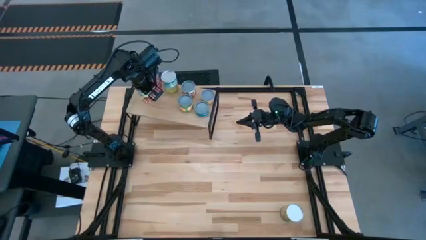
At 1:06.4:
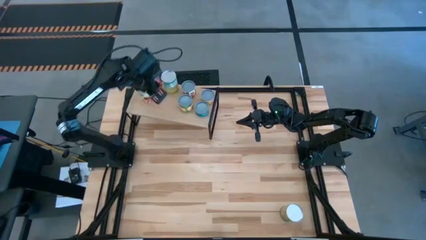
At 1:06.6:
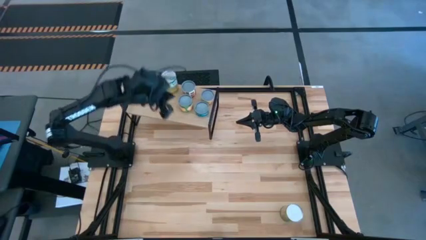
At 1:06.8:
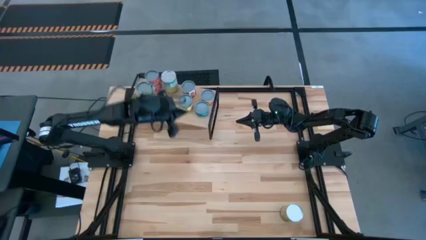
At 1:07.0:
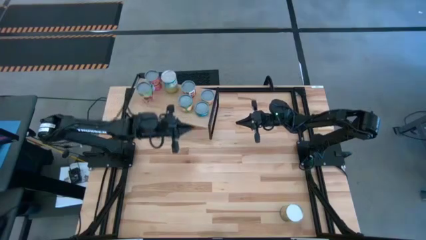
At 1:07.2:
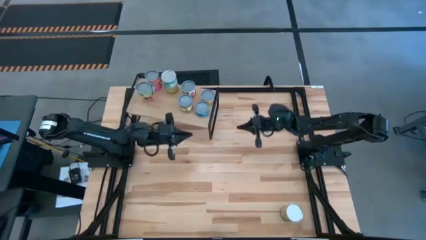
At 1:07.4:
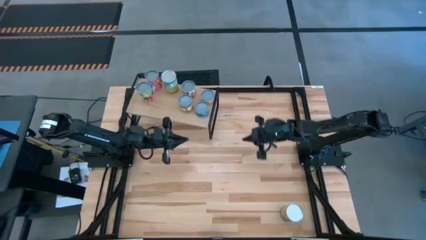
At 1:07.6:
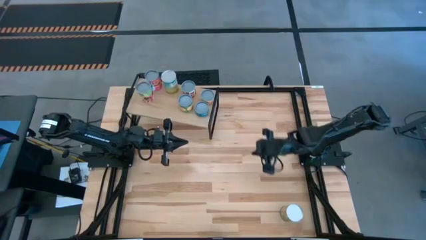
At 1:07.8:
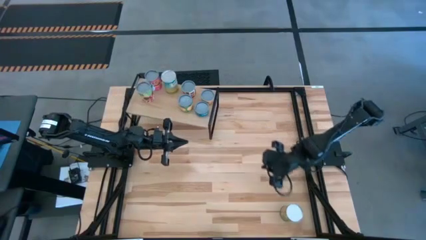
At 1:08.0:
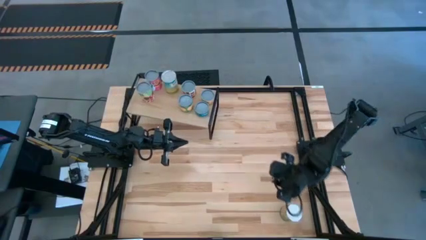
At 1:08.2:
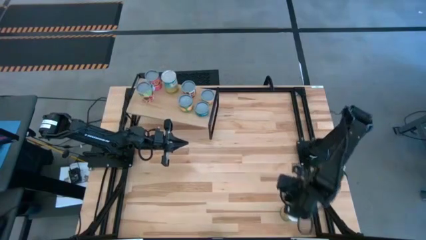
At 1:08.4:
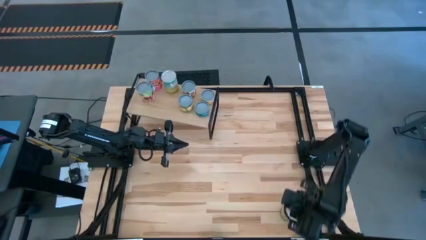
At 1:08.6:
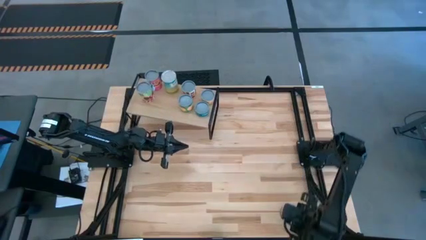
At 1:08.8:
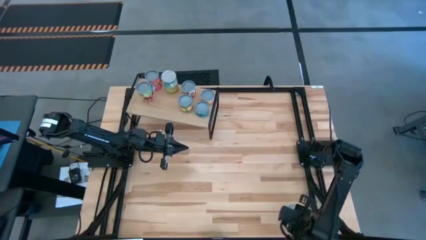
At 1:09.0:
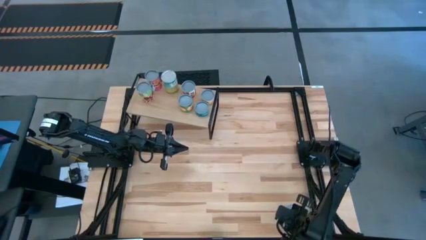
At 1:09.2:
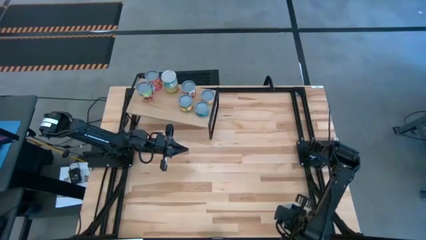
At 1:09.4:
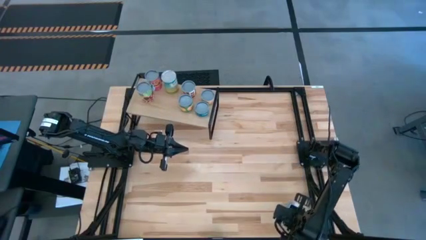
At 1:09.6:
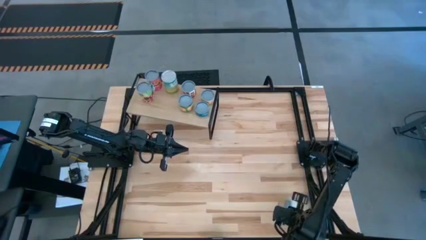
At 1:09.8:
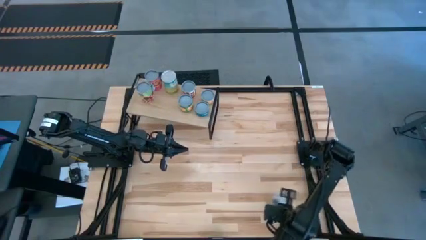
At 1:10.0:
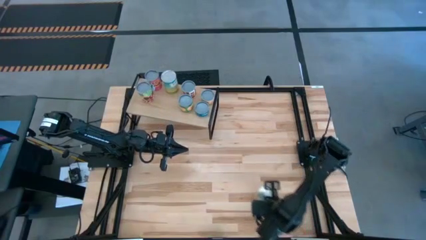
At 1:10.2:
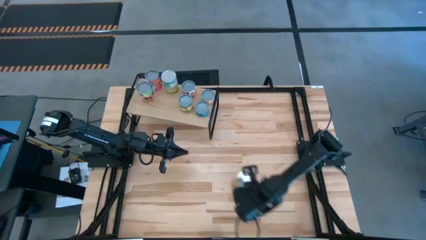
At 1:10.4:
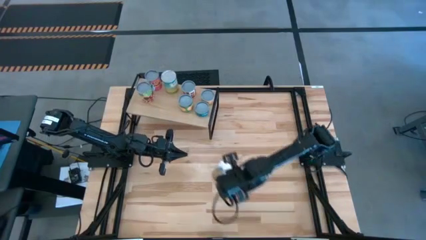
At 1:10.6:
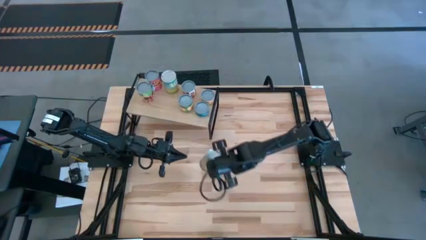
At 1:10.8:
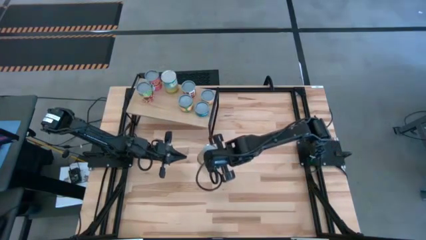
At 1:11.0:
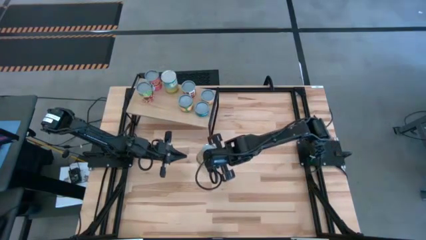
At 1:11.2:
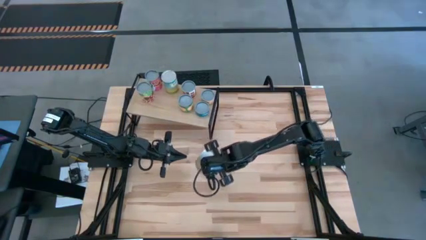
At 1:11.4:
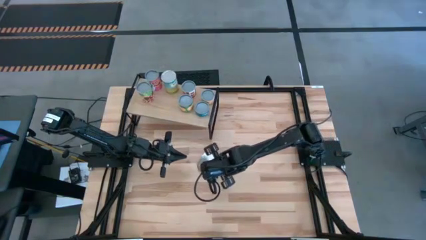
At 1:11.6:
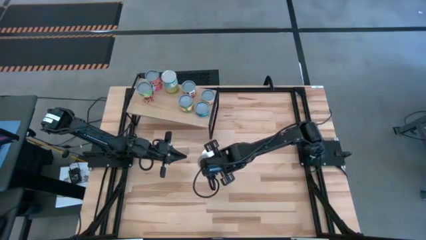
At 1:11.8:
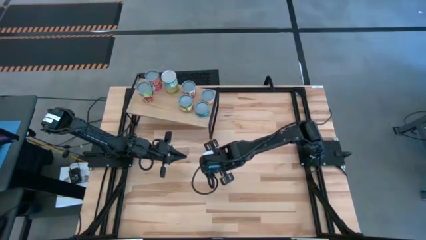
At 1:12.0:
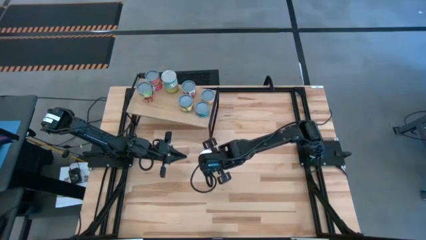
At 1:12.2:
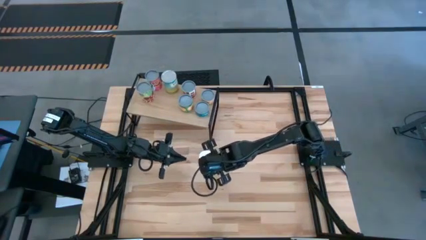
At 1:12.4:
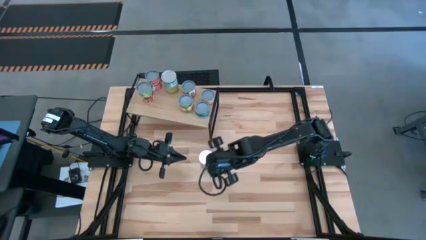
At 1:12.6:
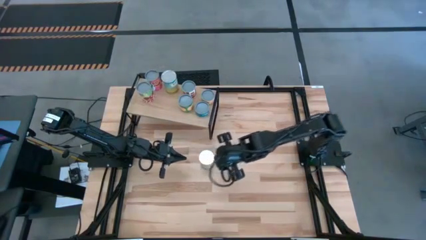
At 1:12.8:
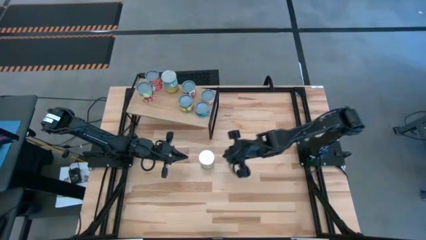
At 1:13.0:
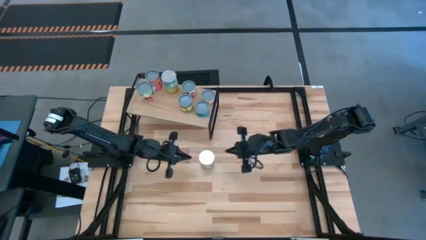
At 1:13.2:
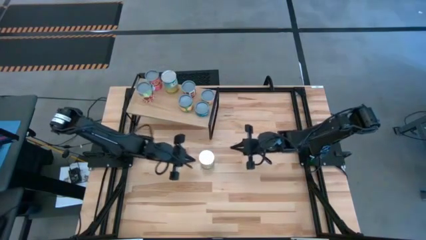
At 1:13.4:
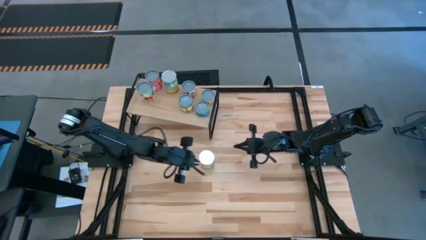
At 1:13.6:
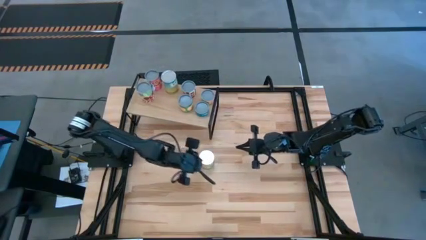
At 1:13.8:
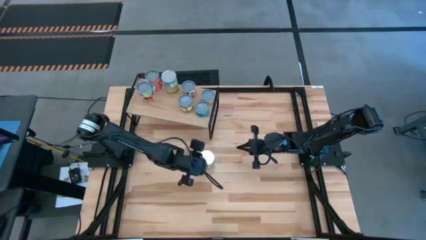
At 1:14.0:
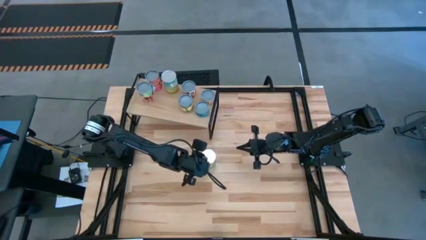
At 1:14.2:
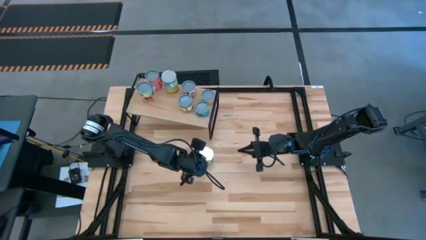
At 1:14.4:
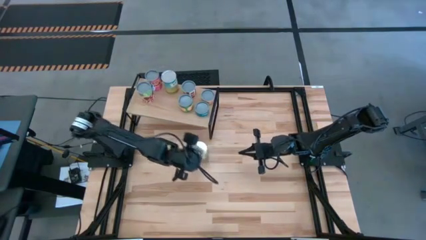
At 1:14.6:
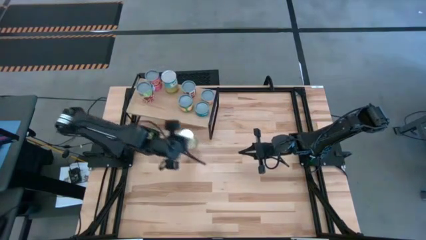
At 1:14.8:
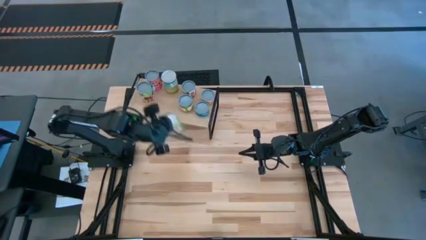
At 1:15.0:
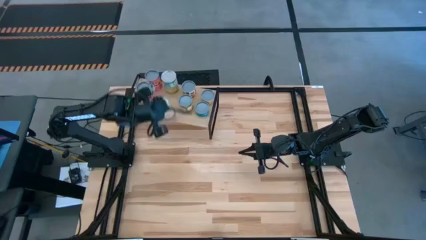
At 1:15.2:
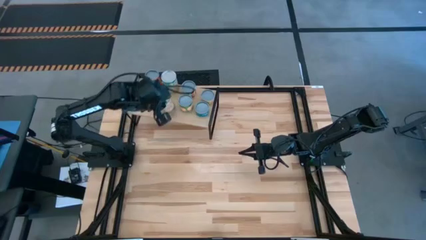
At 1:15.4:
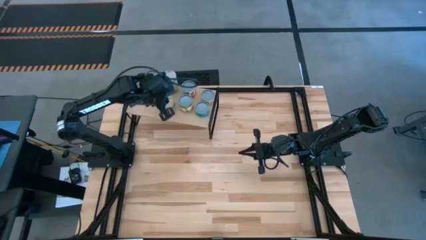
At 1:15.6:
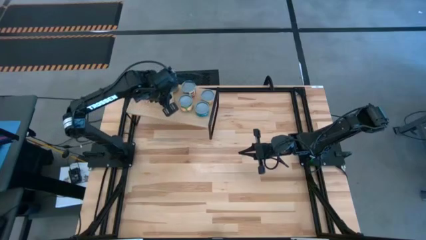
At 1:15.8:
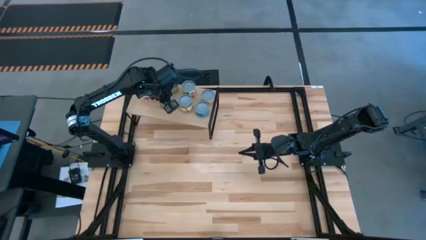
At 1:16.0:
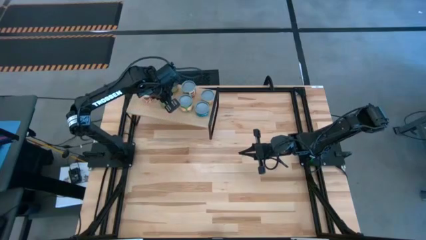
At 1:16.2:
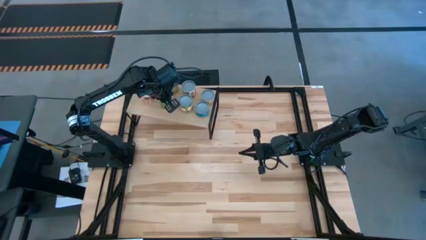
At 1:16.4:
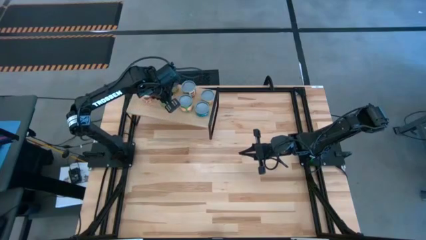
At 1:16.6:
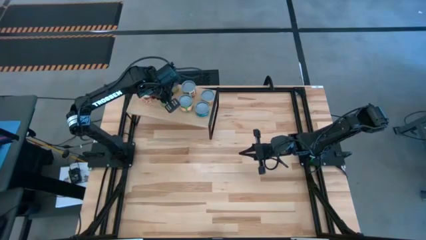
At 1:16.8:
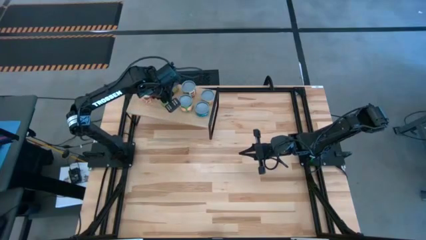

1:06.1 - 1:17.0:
Task: Pick and place cans onto a shelf
Put the canned oranges on the shelf

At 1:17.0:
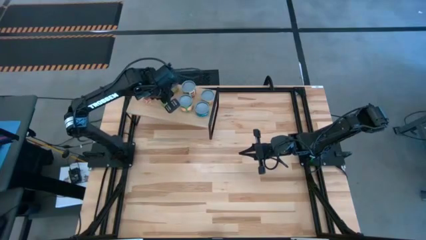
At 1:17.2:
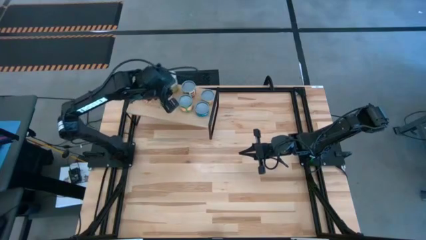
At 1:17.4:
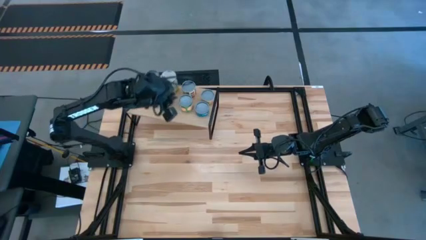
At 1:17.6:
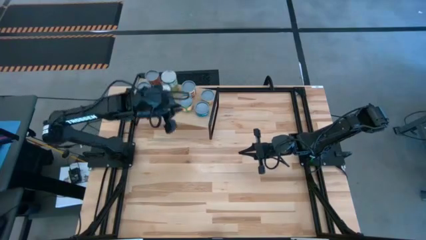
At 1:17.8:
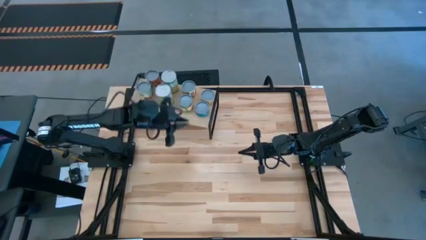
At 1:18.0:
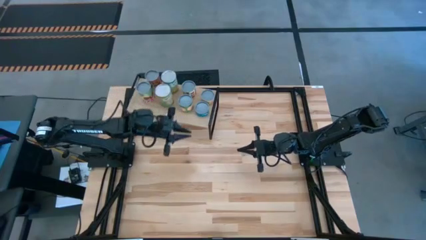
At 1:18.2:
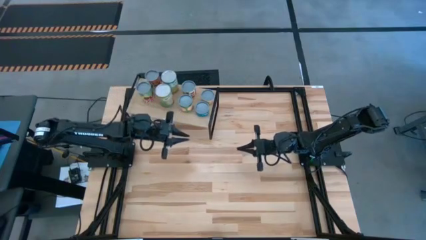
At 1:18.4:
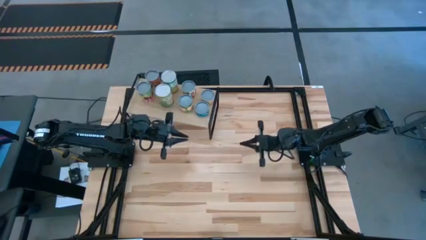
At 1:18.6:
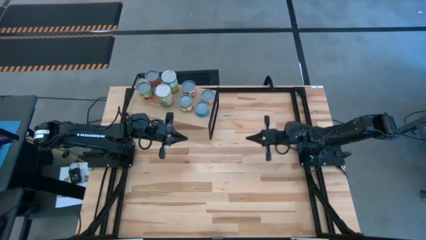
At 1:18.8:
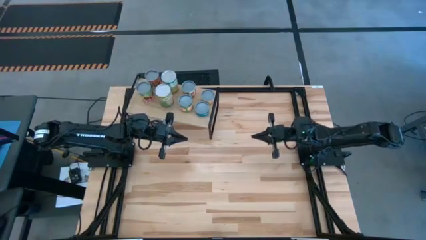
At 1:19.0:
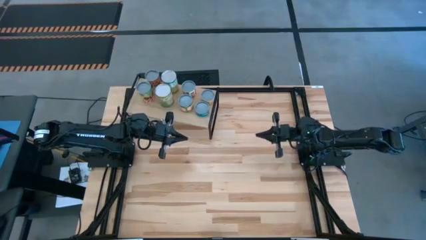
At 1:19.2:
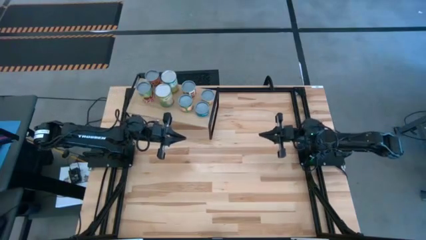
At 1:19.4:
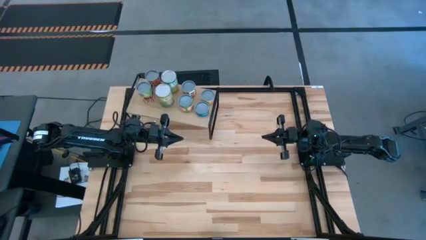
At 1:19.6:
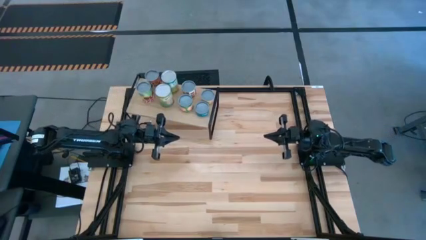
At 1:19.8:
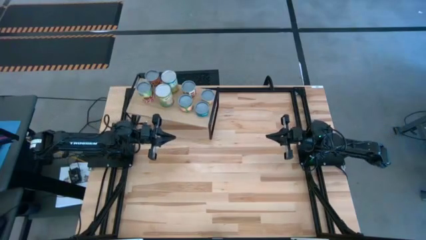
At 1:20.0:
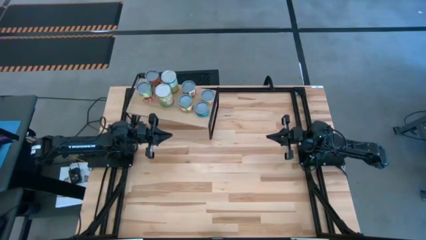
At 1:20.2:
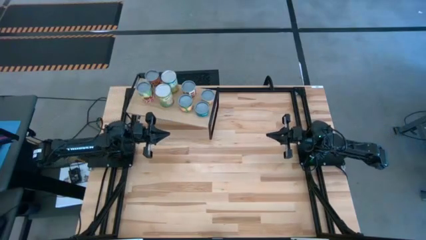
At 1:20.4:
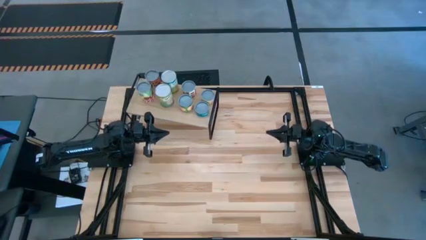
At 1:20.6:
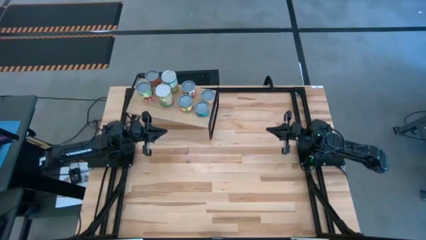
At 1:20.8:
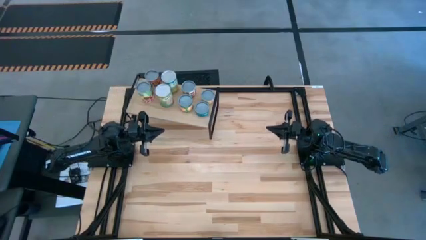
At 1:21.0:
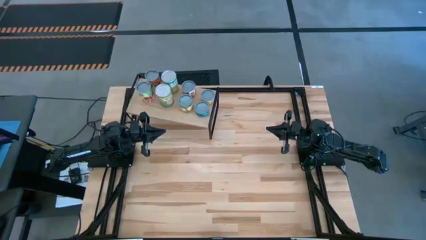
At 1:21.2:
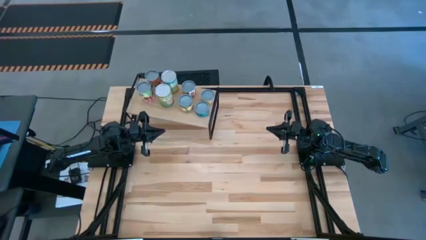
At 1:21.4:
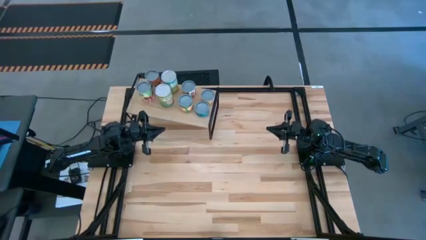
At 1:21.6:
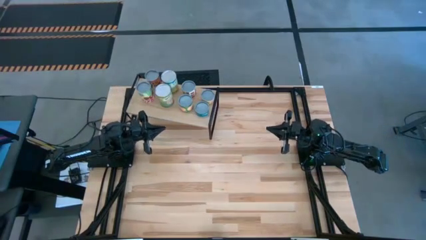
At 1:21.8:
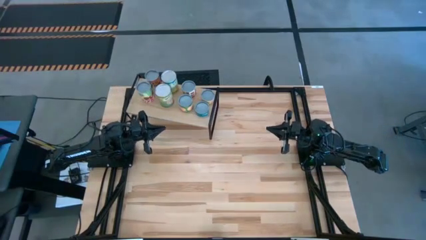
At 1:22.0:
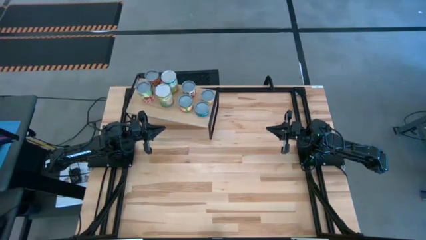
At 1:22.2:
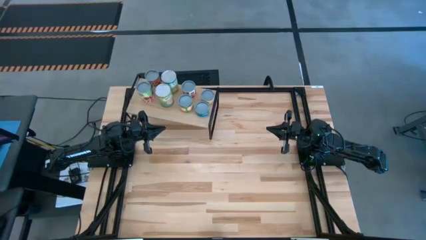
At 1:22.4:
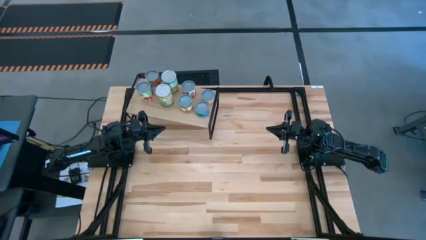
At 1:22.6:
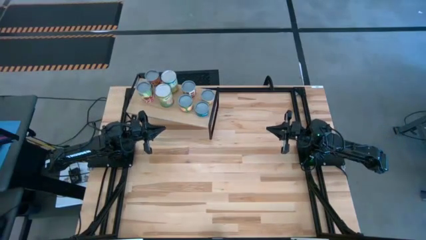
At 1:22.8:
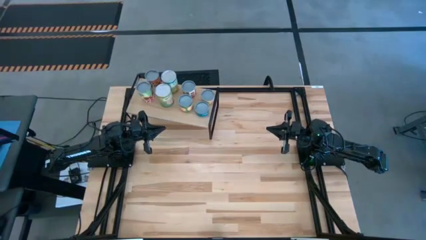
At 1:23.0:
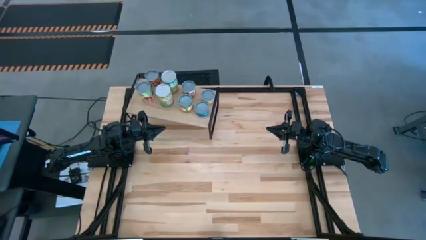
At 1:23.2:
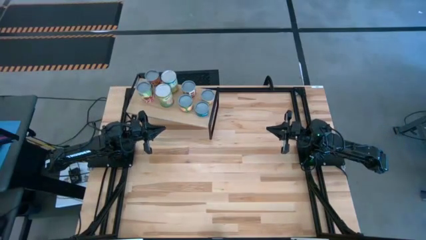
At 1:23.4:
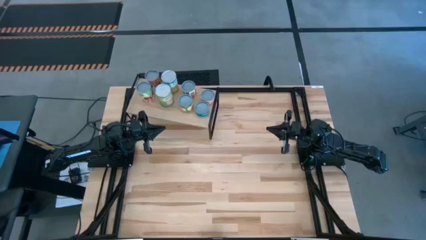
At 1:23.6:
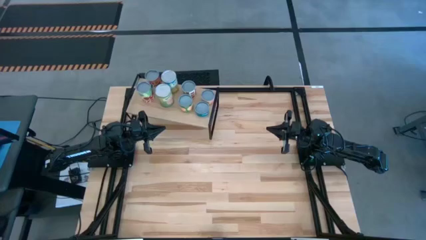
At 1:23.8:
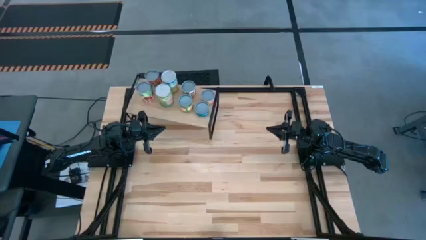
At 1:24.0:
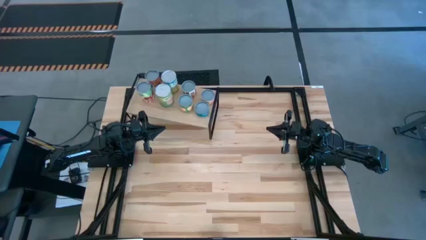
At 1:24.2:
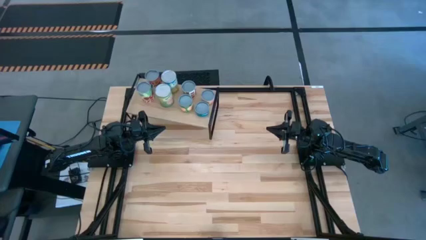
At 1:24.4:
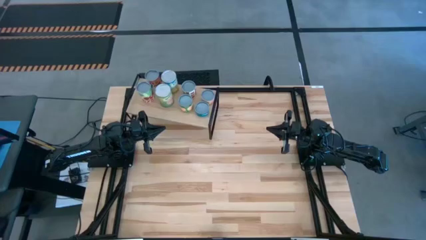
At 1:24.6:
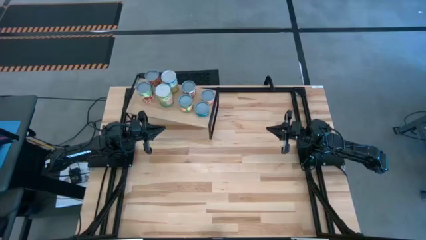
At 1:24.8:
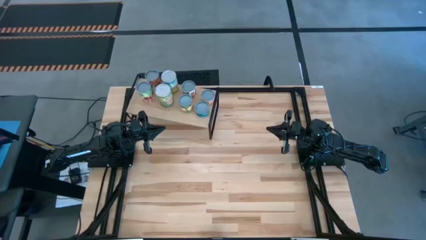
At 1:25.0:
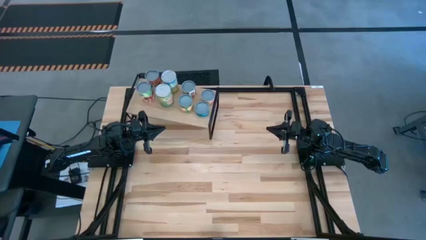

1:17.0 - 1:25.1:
Return to Home Position
